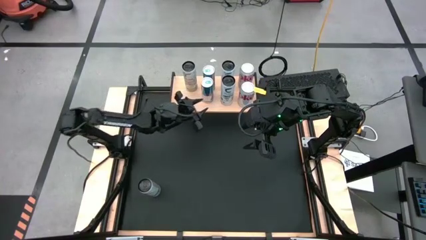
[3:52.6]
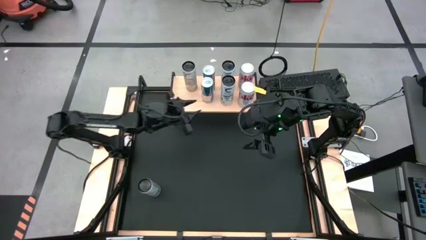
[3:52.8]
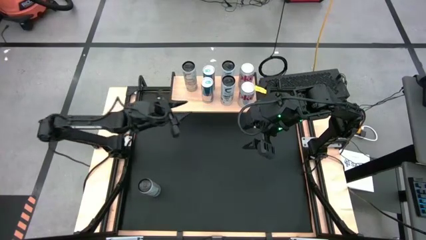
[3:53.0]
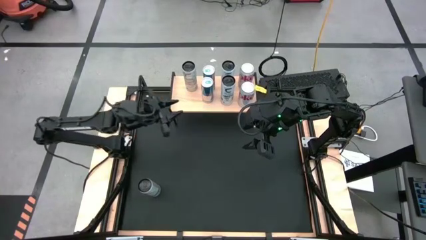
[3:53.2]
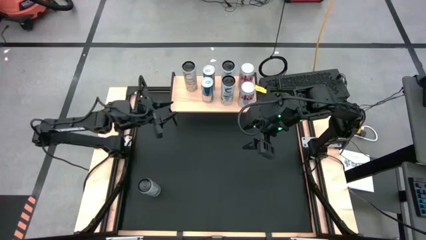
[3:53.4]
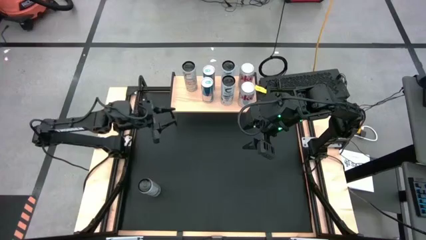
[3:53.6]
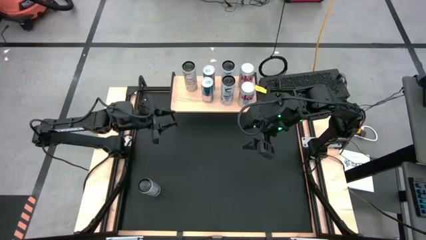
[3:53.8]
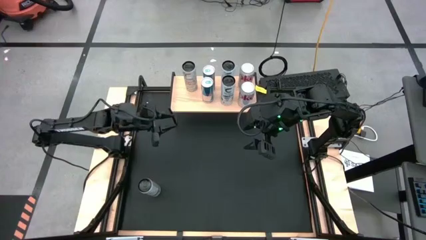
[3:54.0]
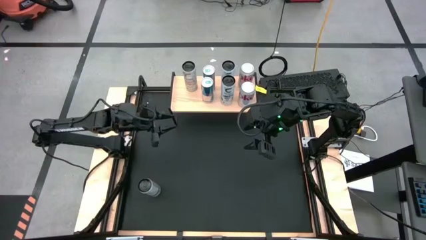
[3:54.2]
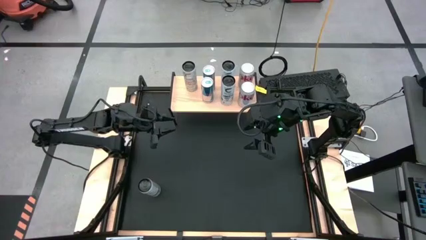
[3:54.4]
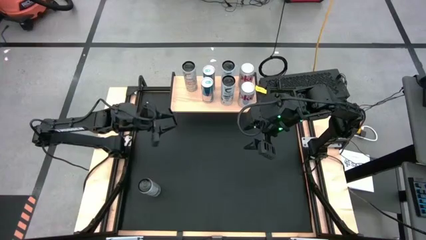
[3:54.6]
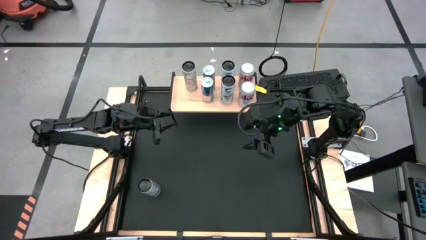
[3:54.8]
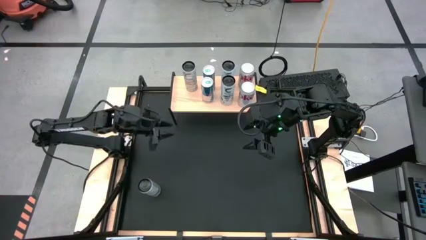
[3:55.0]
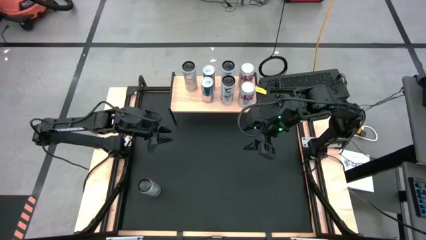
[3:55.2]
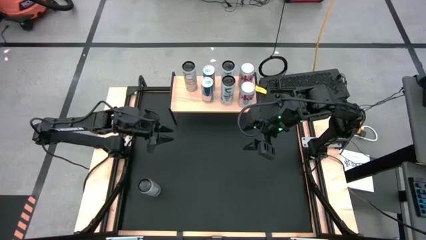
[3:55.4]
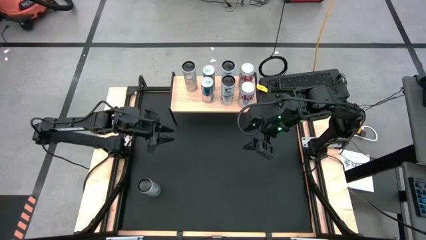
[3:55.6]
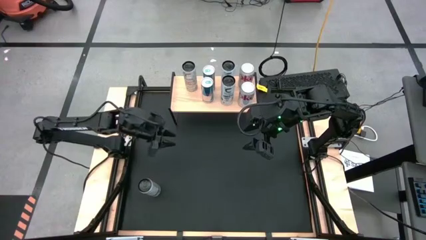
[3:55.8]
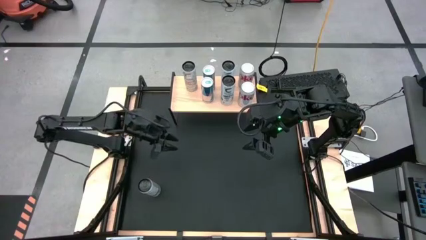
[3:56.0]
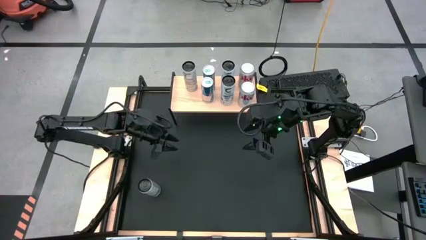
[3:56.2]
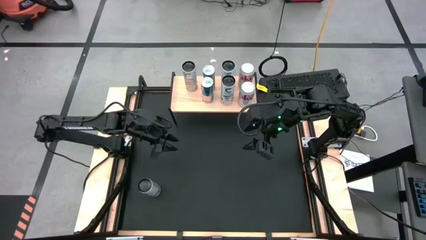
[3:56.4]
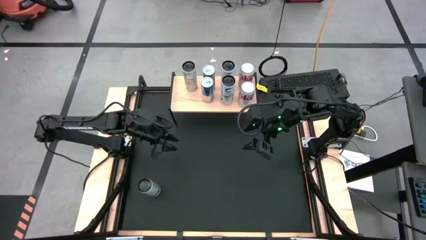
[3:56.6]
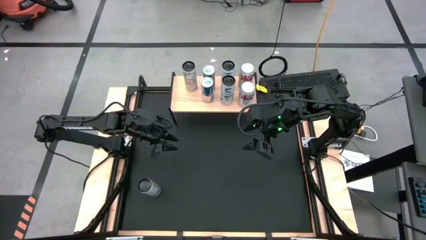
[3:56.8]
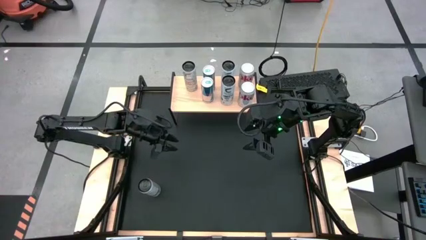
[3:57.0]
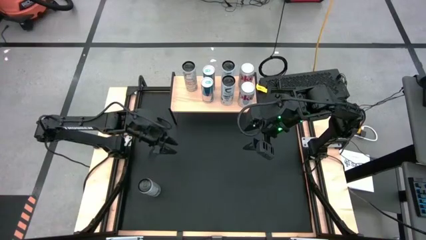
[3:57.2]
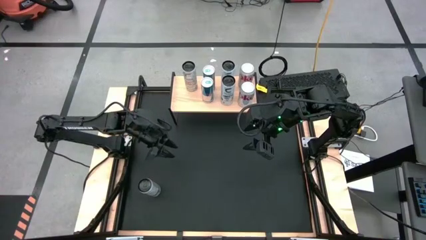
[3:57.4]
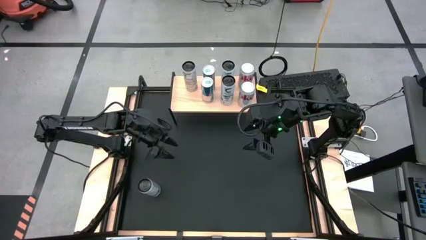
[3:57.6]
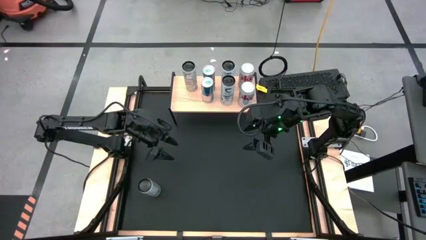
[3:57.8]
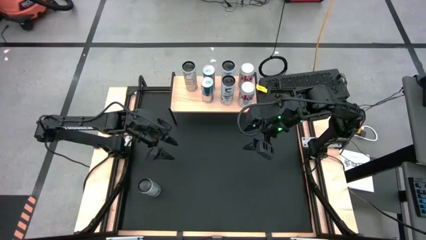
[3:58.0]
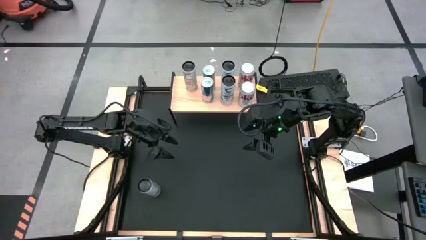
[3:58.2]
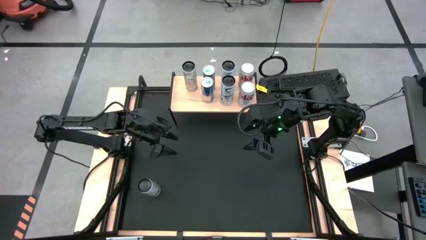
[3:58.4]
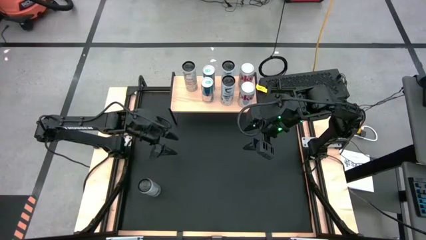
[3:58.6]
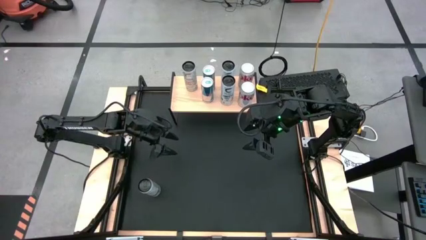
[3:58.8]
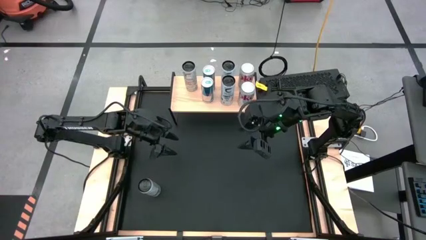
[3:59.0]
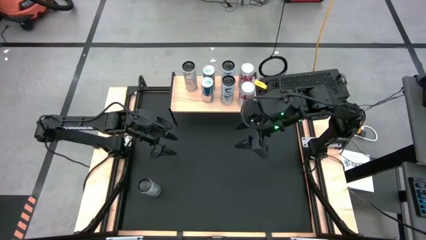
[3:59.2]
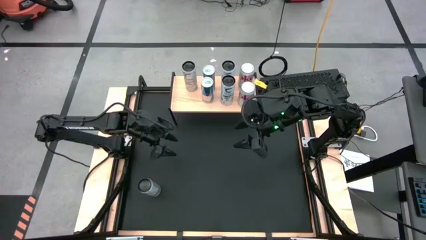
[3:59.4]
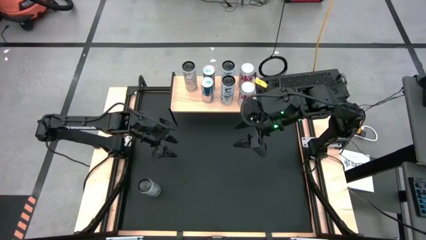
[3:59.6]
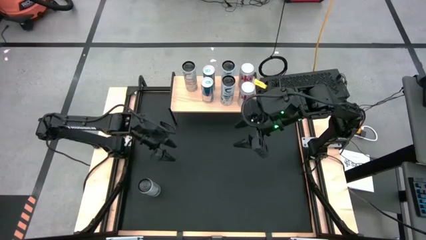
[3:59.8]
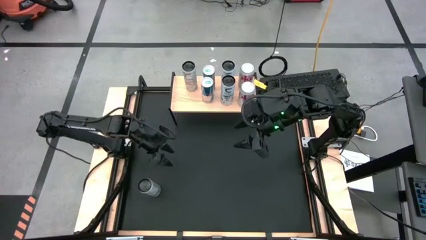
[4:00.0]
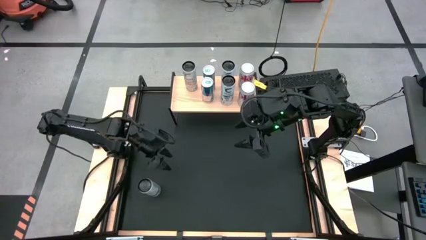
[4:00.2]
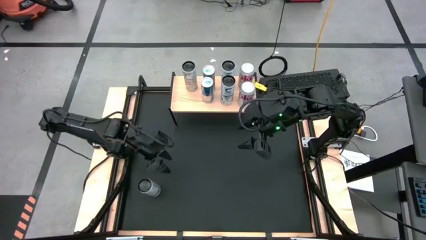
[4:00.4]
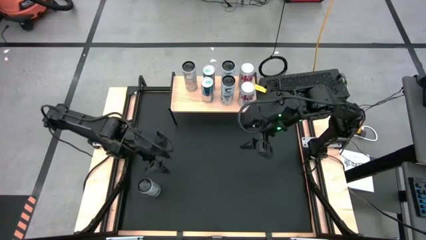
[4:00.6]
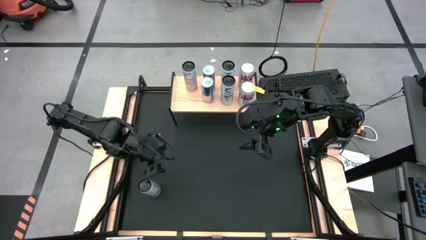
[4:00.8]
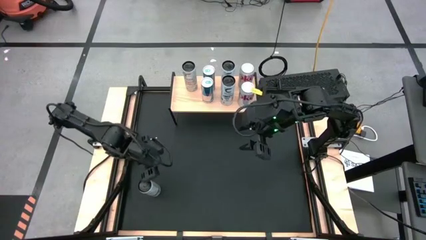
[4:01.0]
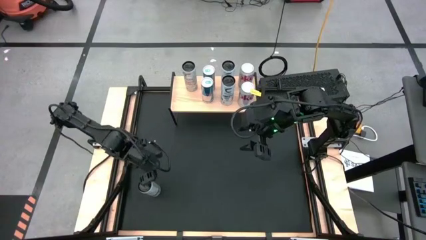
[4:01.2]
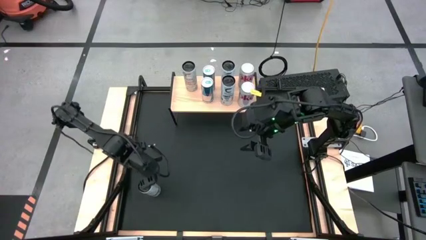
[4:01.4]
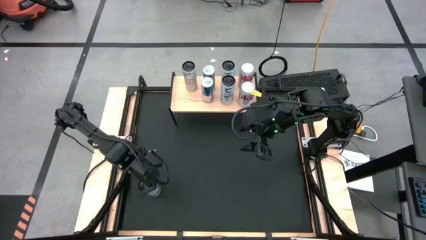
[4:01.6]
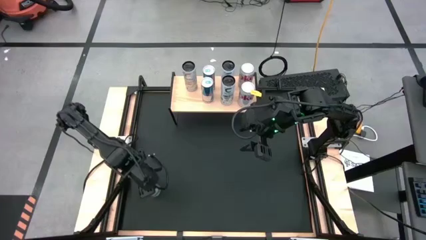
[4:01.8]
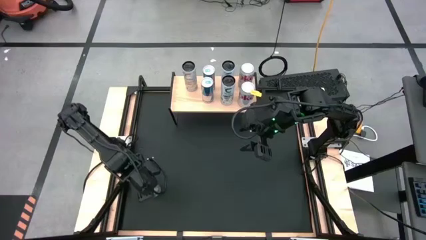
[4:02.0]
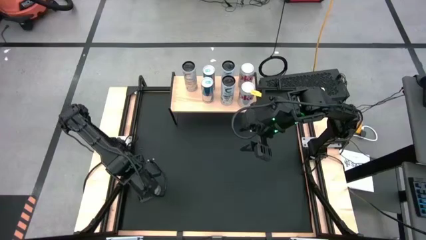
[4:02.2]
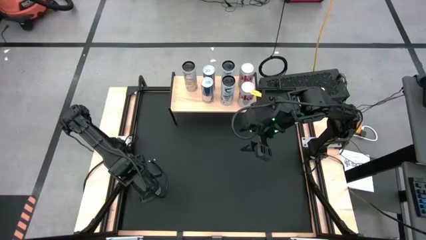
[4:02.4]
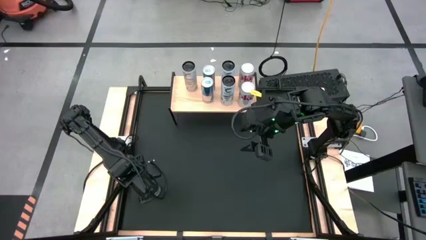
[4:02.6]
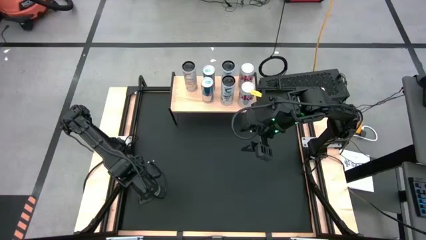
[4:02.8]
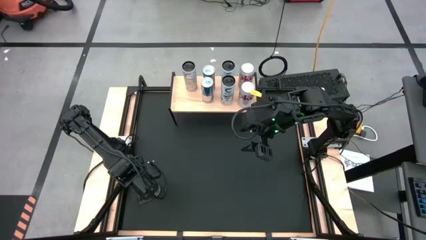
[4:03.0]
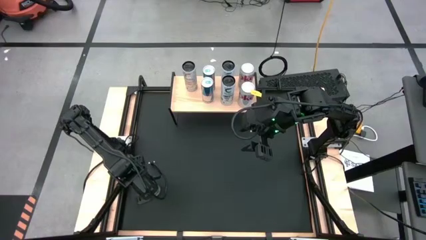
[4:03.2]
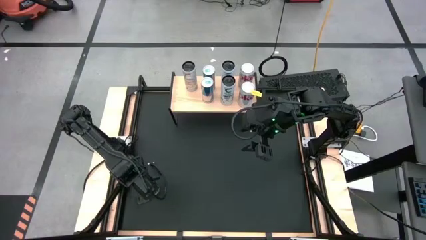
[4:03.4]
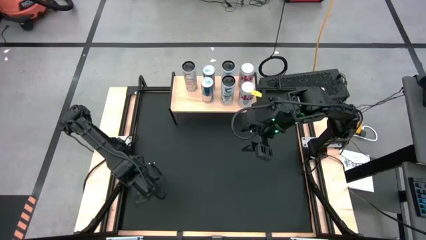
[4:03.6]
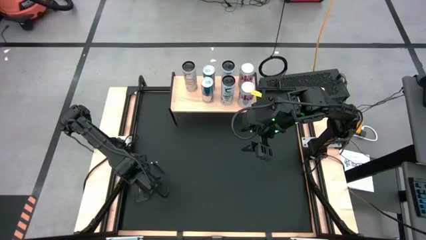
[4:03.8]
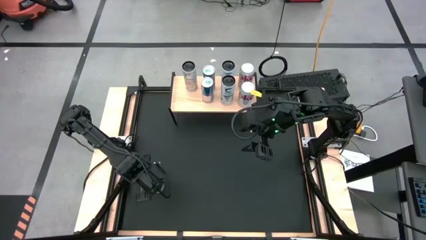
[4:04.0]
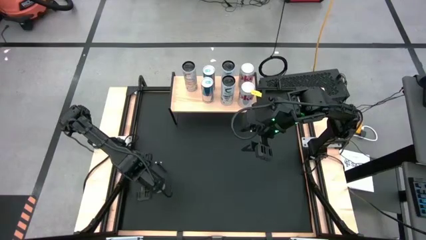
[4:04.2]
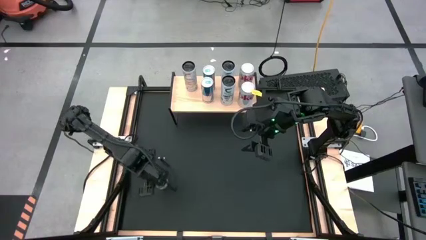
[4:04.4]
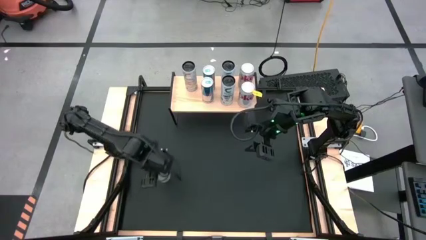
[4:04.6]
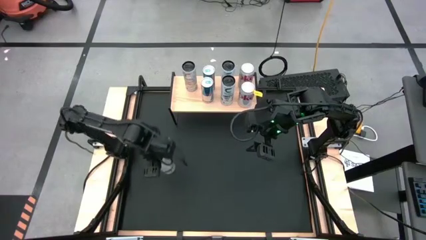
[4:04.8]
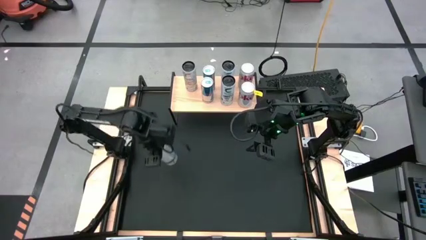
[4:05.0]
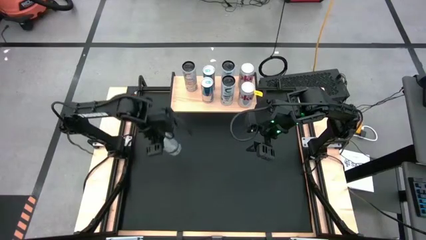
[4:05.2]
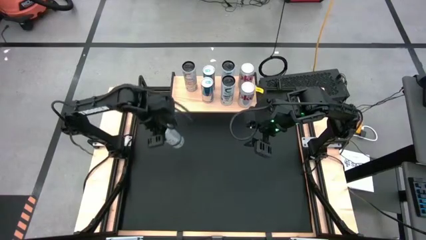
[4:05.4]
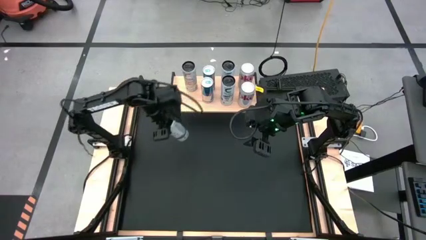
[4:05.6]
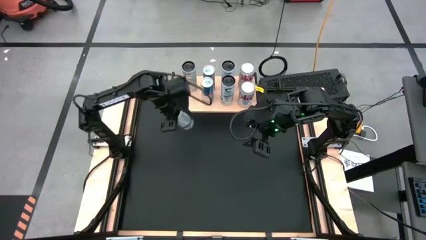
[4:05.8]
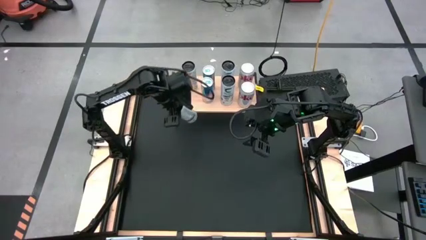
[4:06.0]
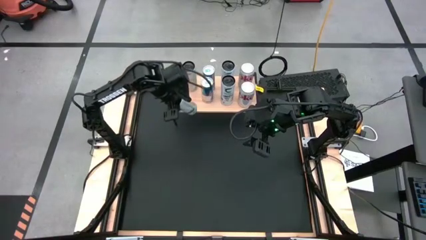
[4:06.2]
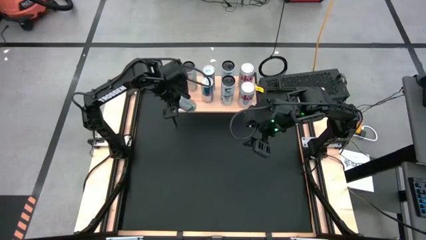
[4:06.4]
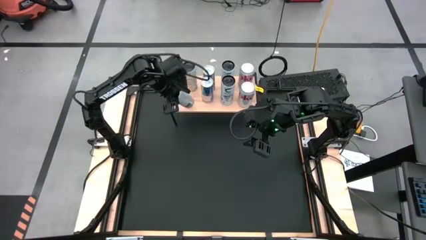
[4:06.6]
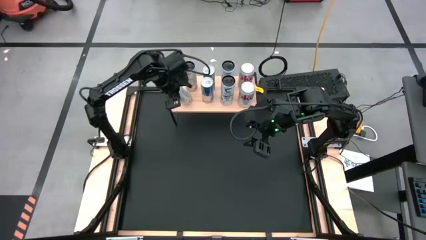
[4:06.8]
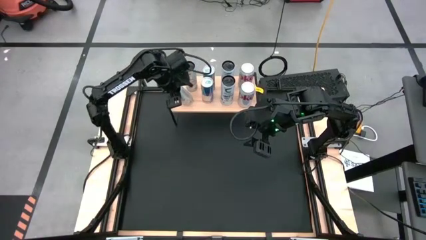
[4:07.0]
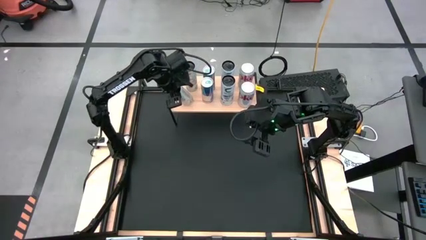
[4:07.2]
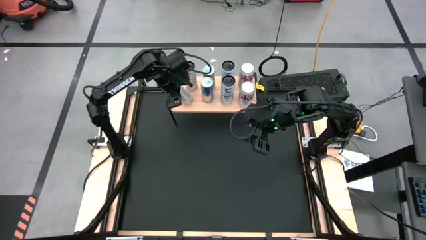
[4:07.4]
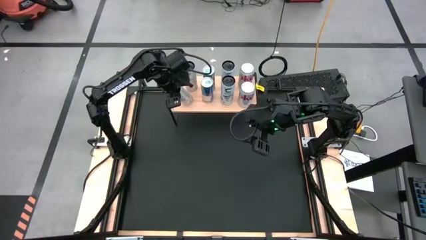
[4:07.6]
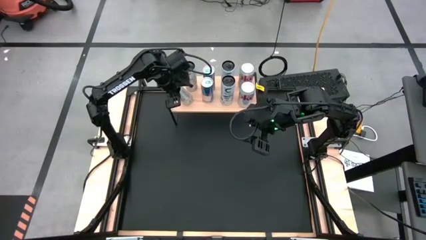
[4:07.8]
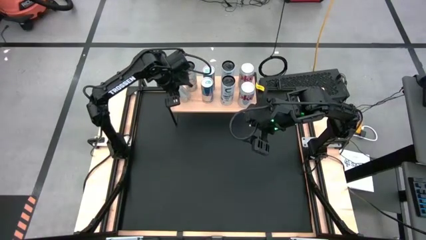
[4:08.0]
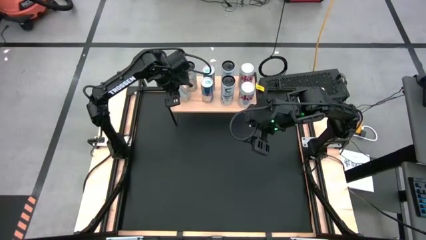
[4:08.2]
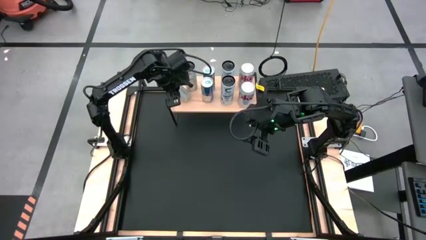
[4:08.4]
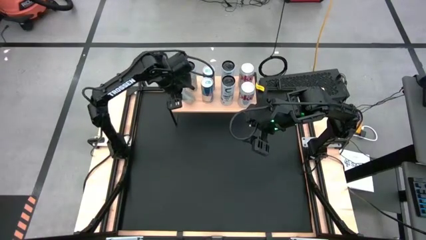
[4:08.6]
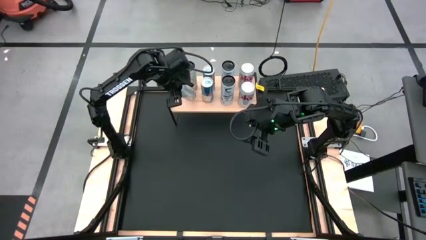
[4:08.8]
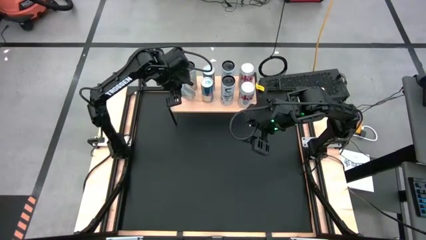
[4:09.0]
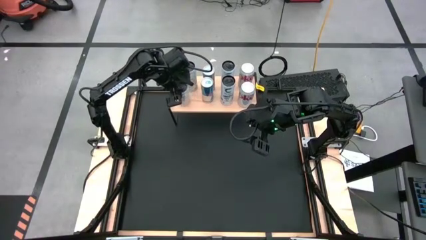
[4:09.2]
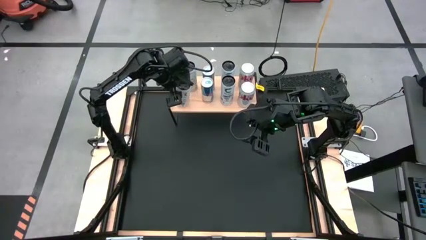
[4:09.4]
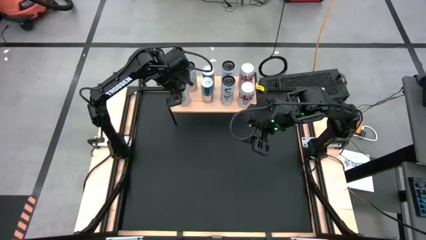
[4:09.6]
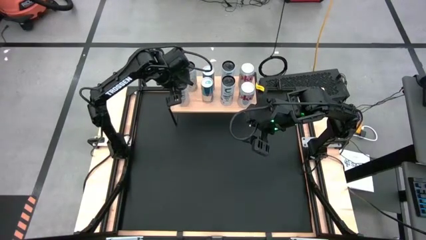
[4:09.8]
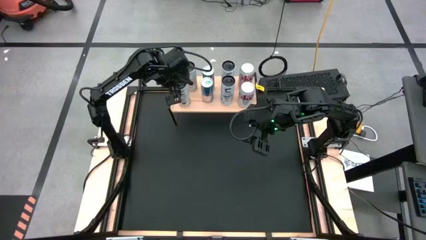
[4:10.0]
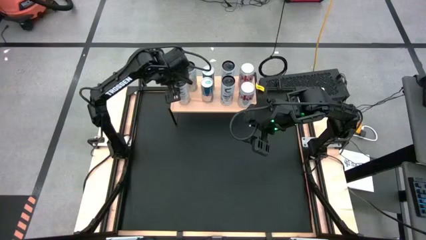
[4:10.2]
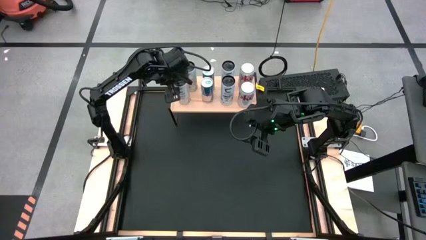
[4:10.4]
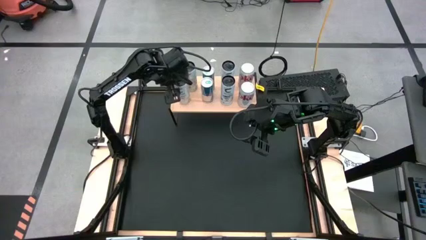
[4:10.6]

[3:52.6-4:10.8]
Task: Place canned beverage on shelf
Put the white and black soda can on the shelf
